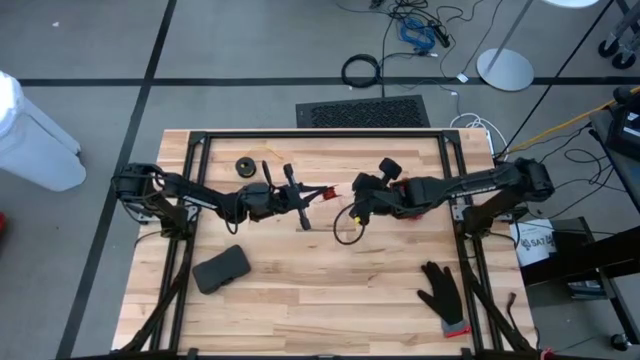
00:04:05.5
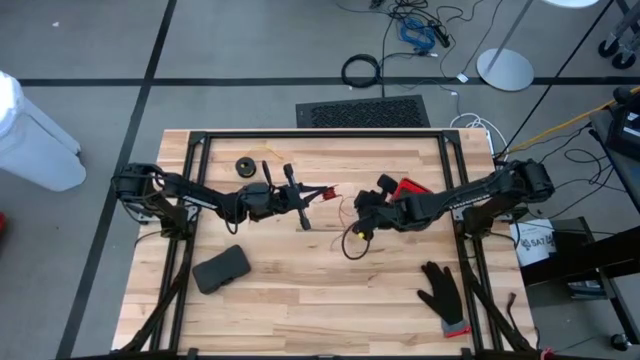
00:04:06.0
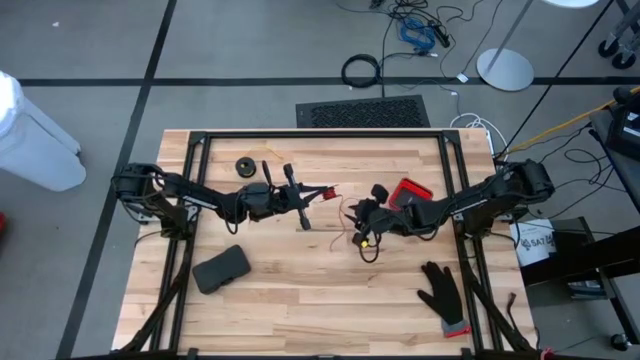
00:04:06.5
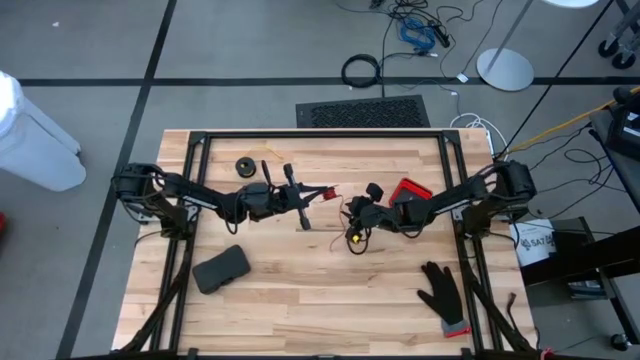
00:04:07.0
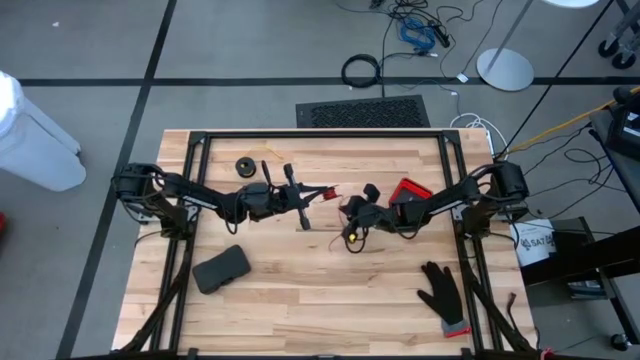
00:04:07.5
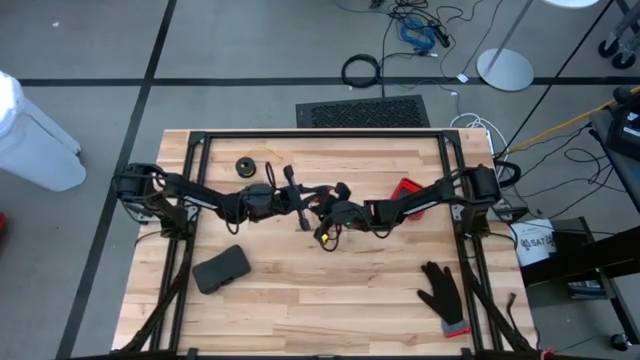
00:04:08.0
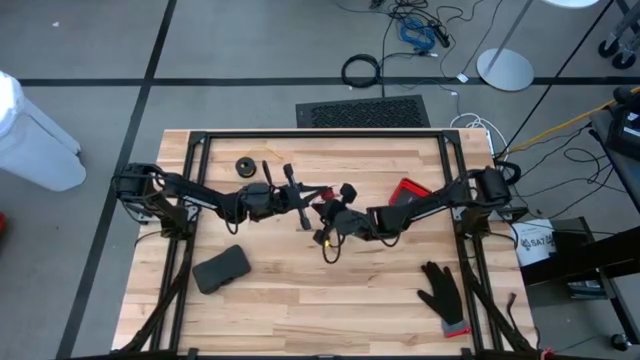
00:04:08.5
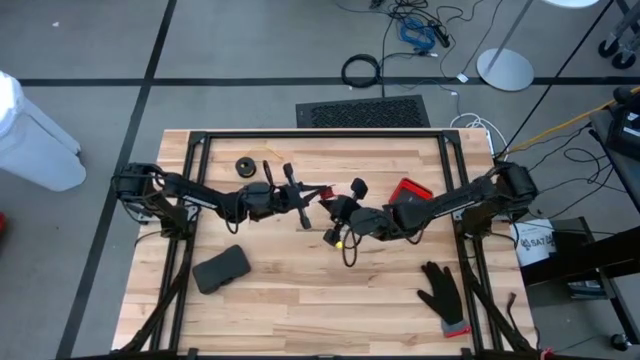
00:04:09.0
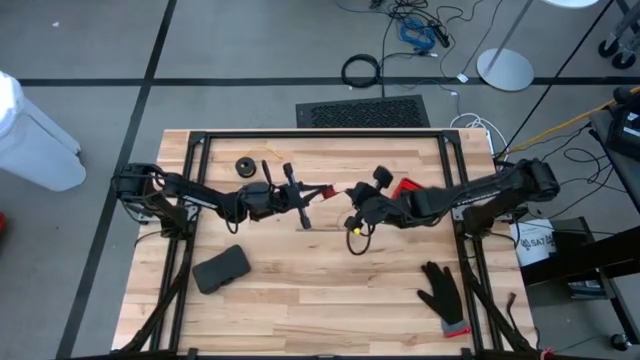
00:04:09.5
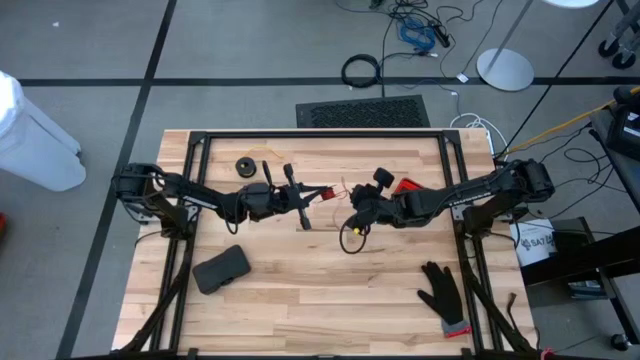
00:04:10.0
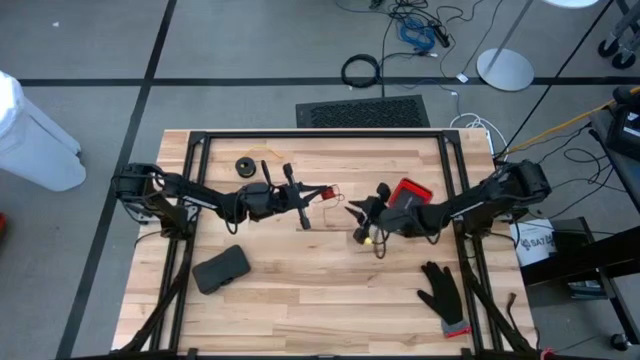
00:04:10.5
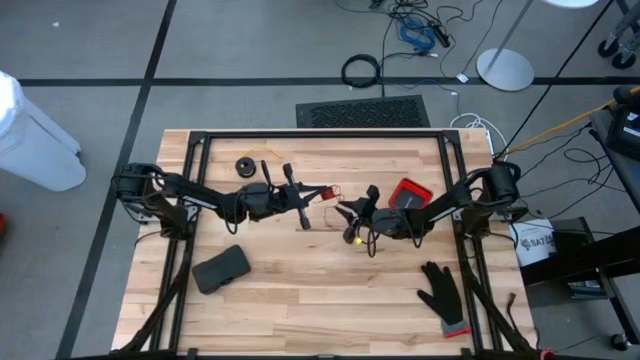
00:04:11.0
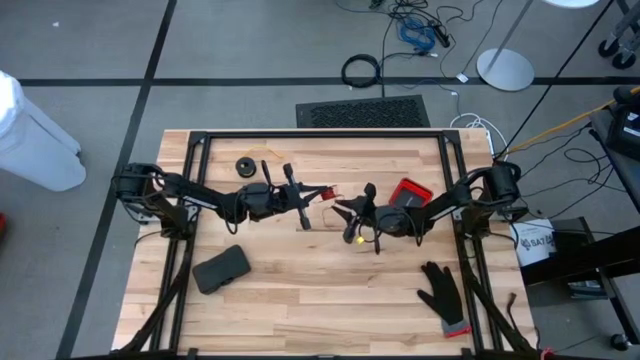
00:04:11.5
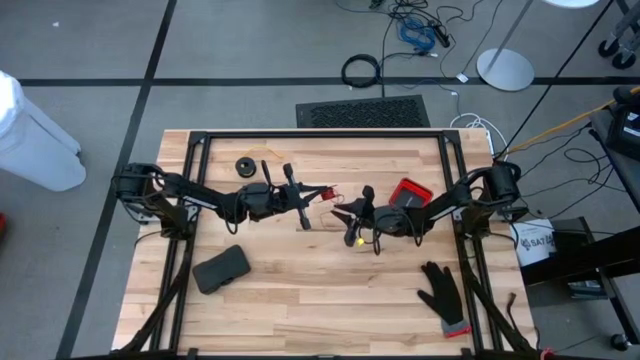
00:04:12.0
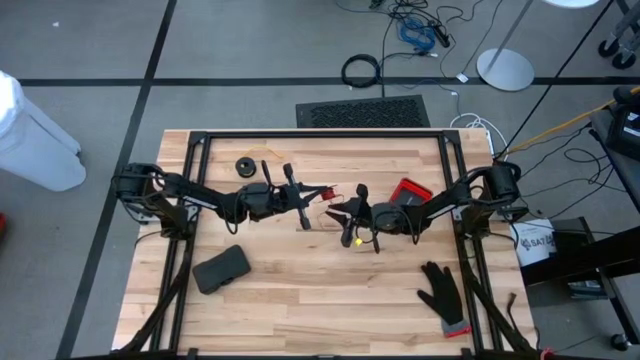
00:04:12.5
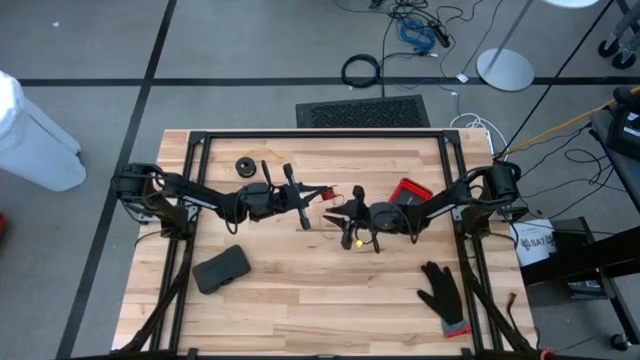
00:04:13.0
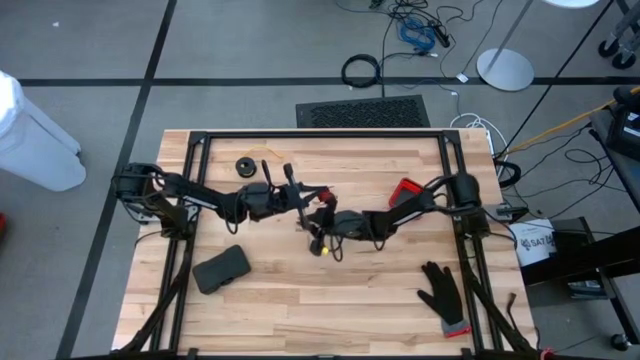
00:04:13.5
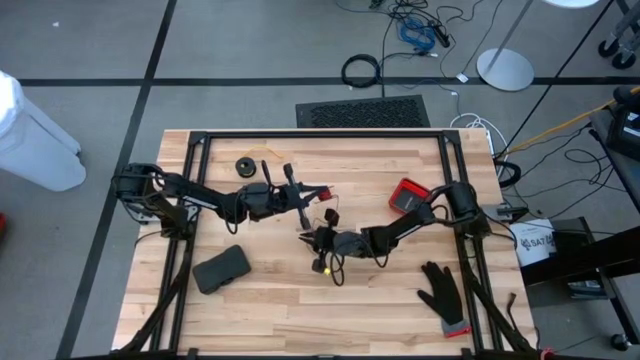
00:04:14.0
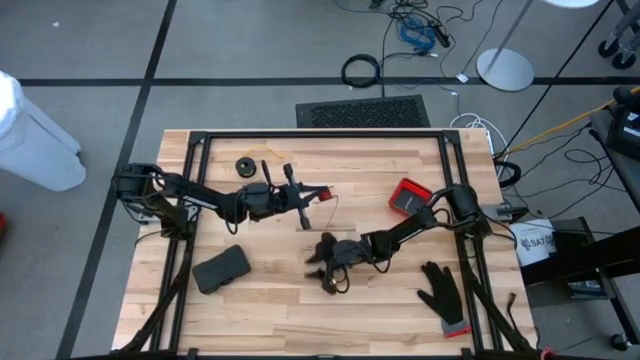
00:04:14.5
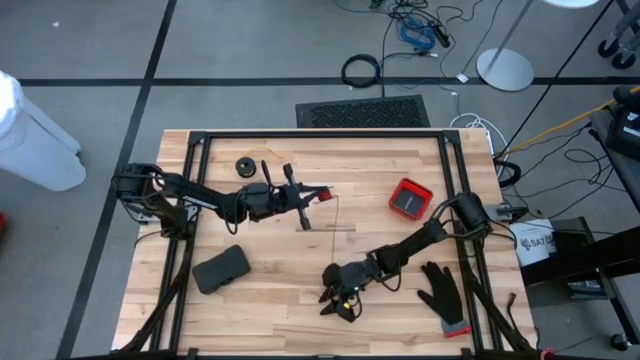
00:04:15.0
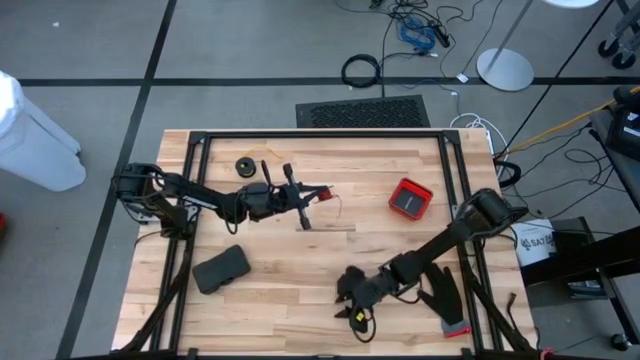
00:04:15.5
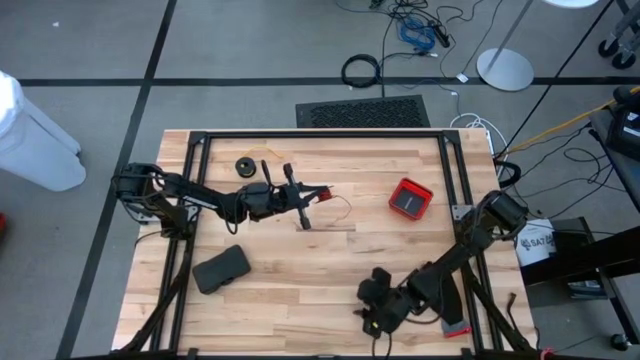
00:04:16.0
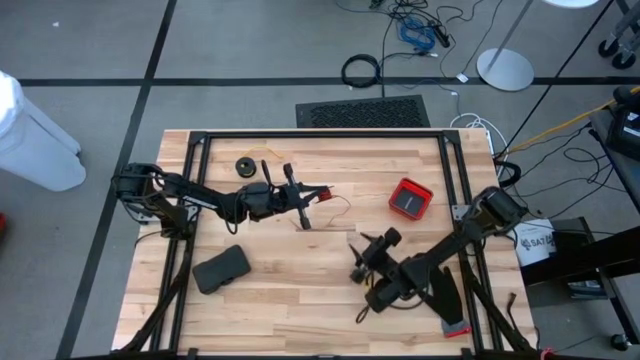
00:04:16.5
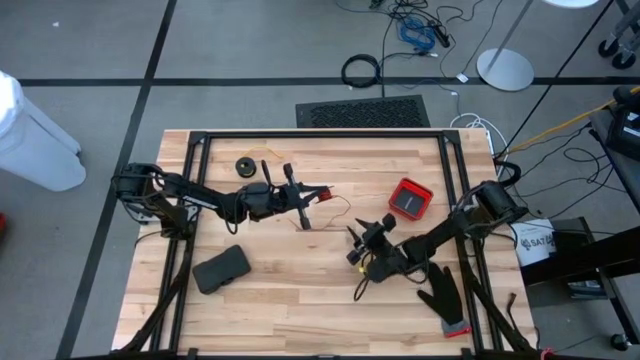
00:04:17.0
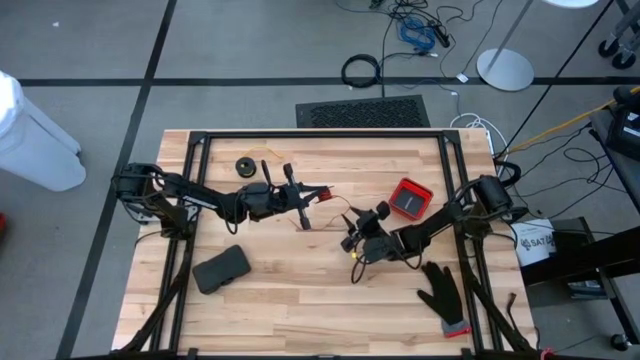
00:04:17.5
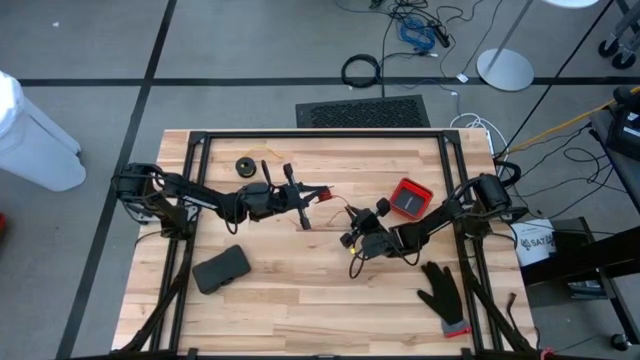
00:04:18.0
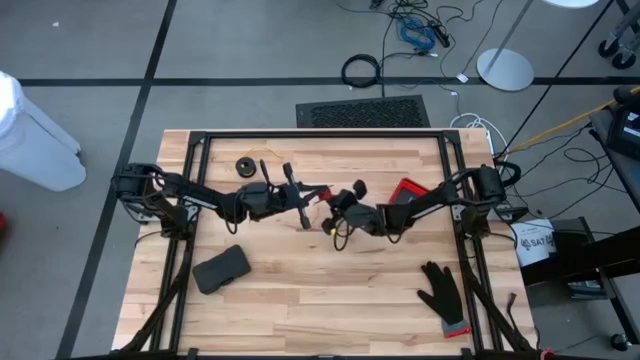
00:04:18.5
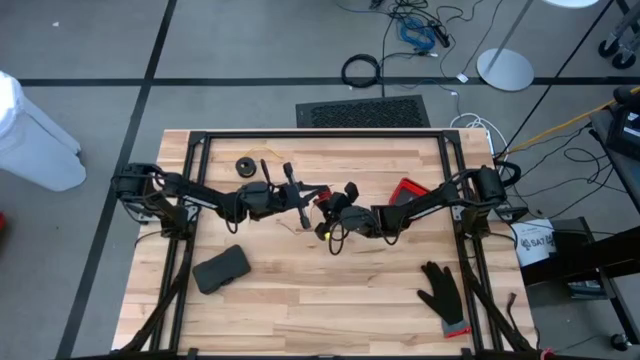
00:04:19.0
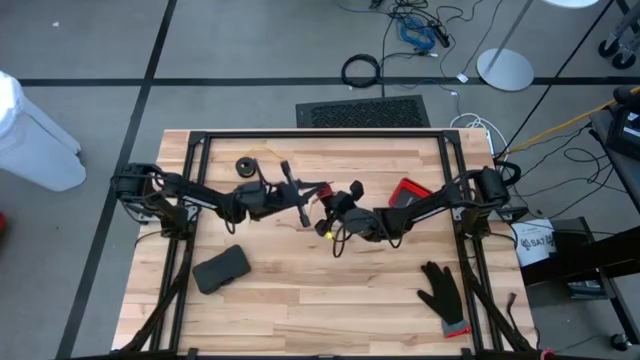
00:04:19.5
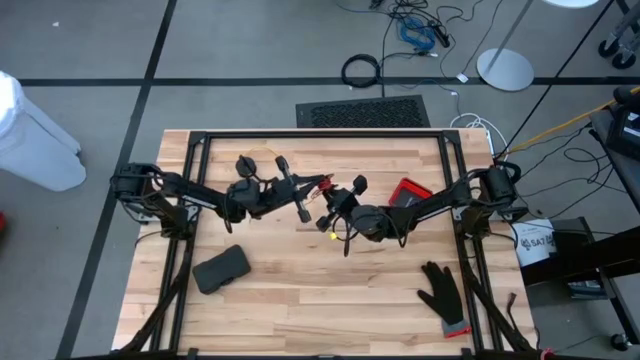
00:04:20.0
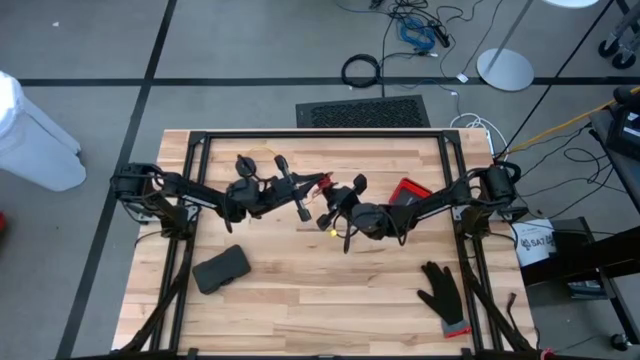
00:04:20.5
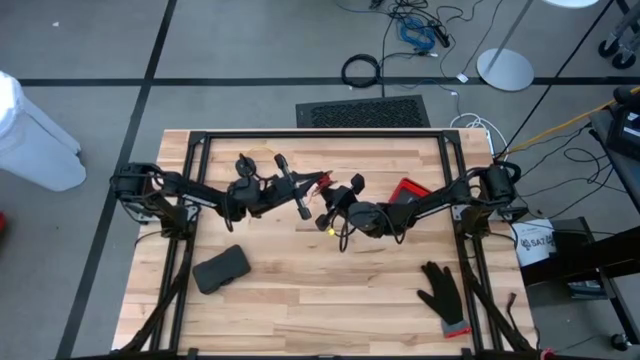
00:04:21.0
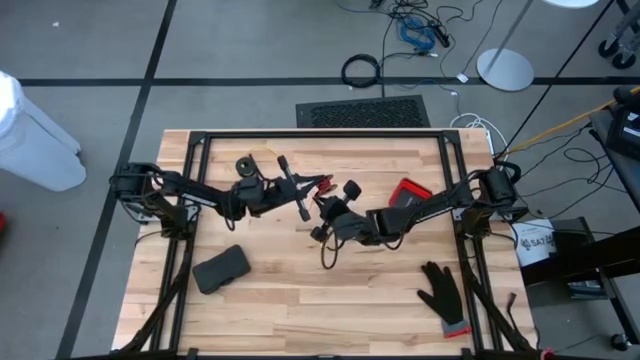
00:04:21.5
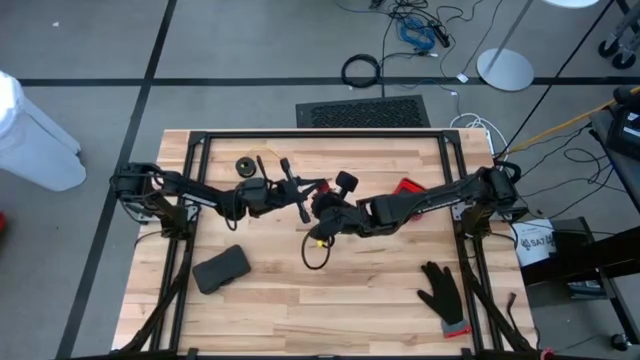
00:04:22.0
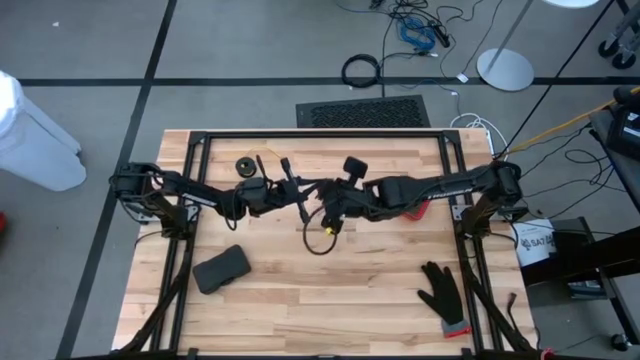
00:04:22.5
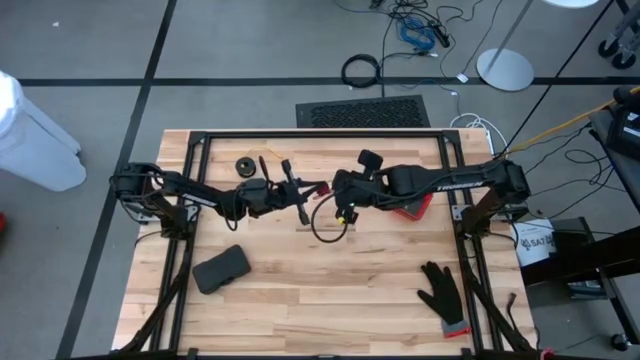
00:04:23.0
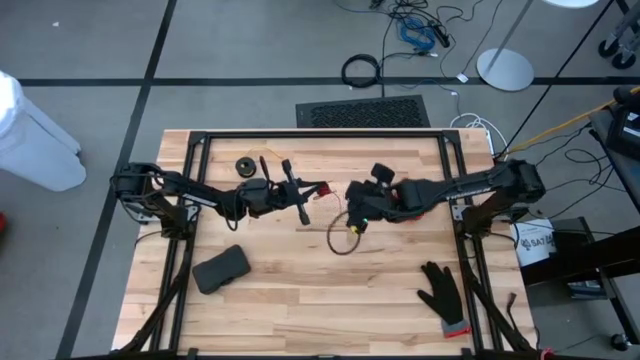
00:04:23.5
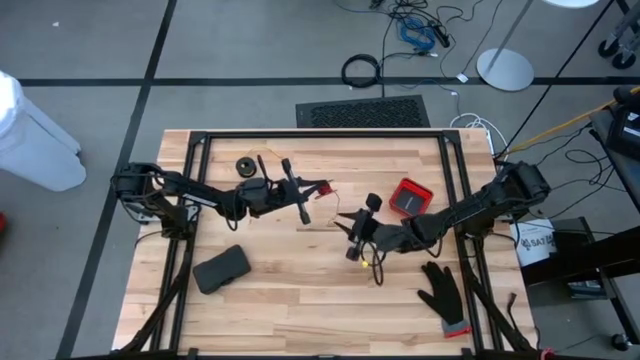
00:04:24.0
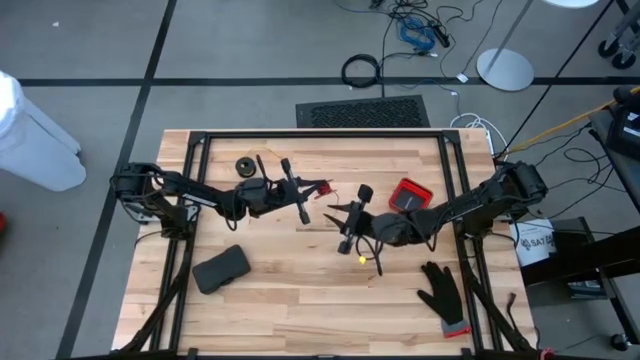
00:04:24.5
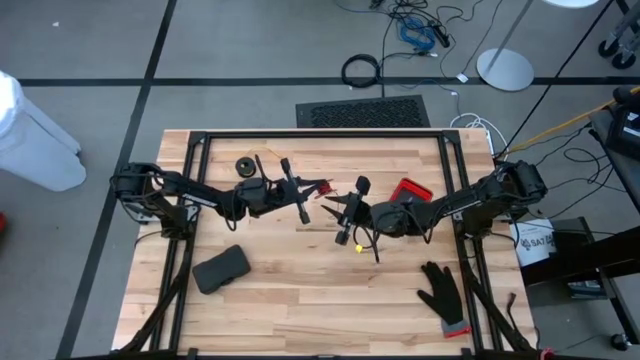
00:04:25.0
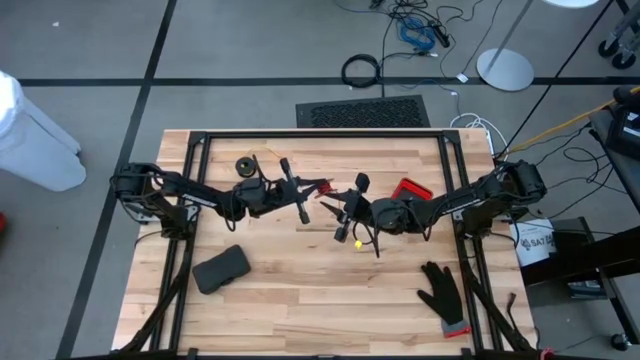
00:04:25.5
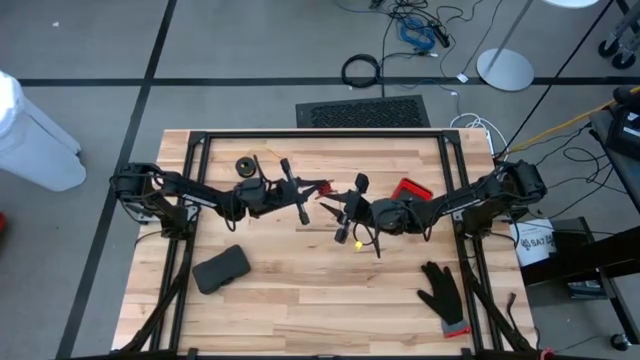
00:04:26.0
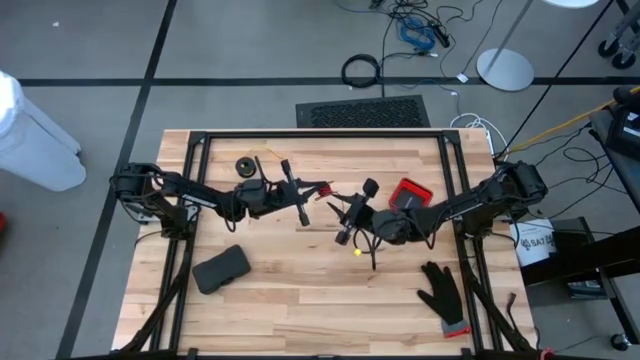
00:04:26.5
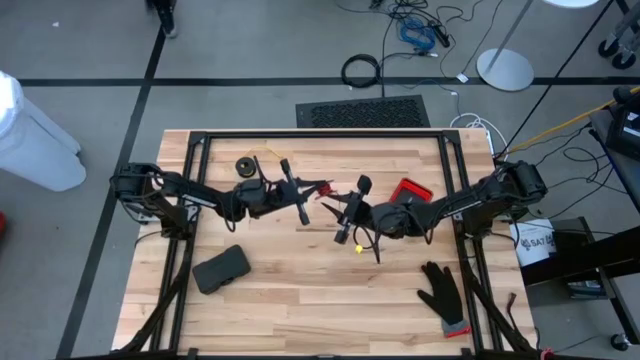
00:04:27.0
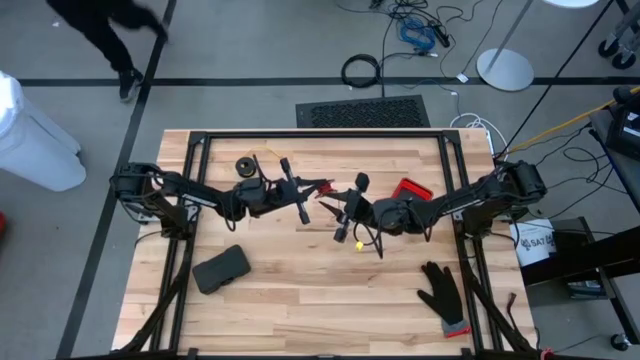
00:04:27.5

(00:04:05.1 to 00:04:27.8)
Task: Coil cords
Coil the red wire onto the black spool
